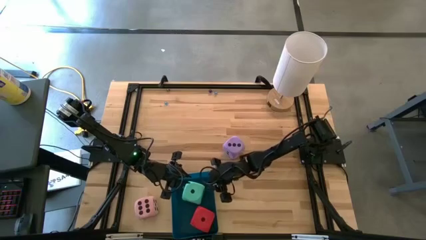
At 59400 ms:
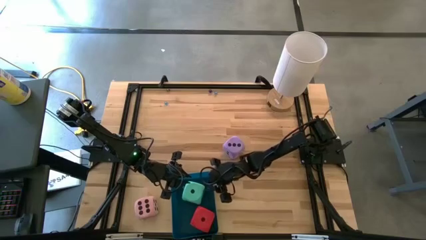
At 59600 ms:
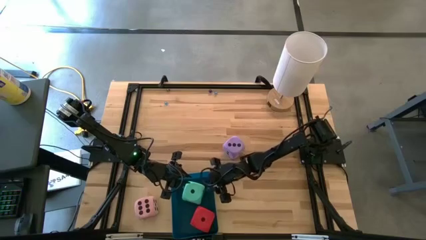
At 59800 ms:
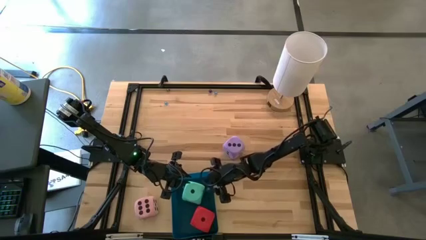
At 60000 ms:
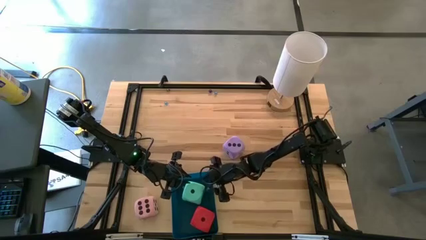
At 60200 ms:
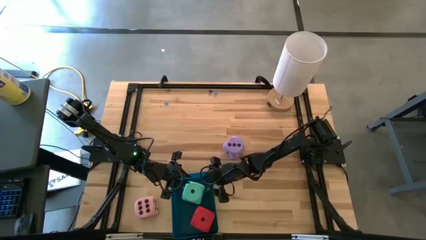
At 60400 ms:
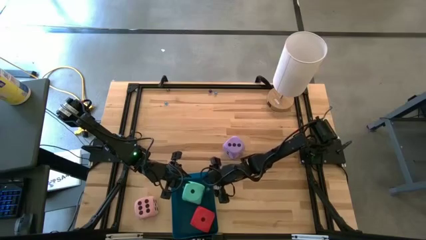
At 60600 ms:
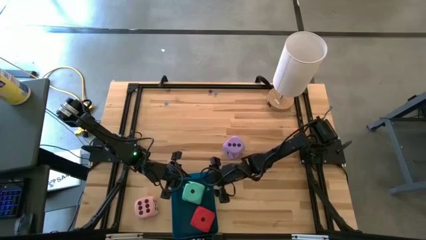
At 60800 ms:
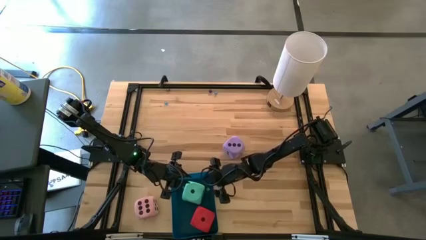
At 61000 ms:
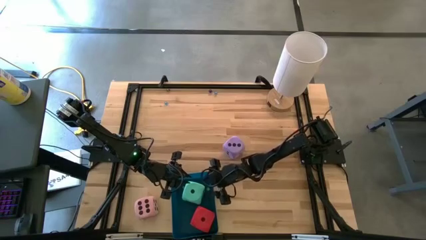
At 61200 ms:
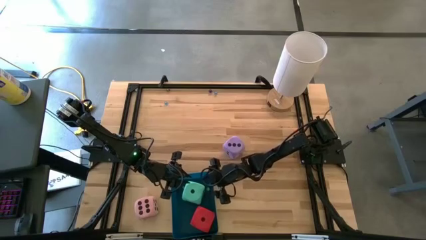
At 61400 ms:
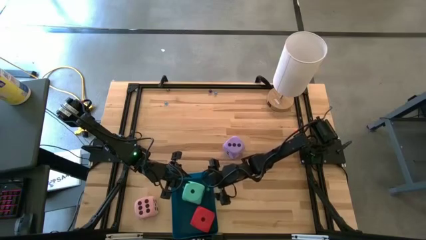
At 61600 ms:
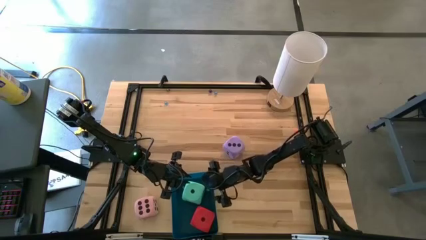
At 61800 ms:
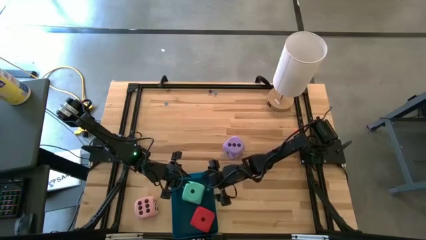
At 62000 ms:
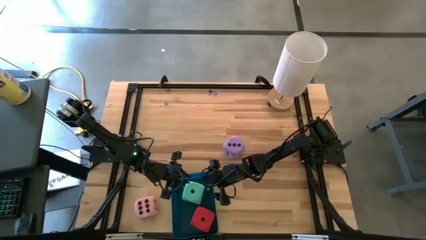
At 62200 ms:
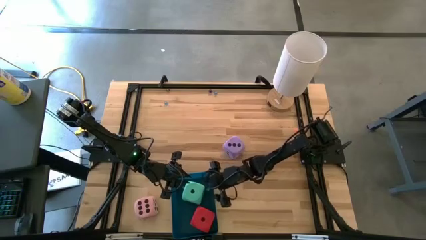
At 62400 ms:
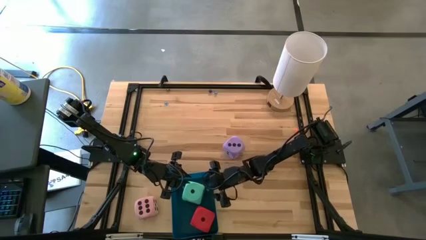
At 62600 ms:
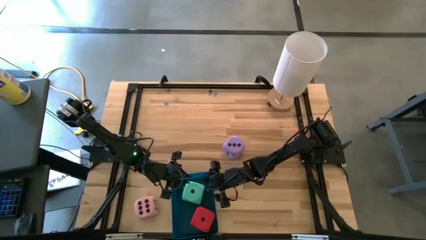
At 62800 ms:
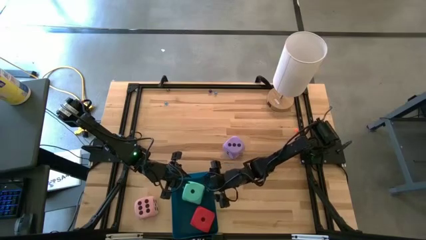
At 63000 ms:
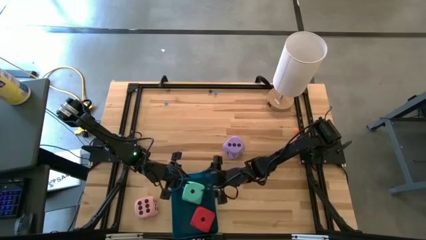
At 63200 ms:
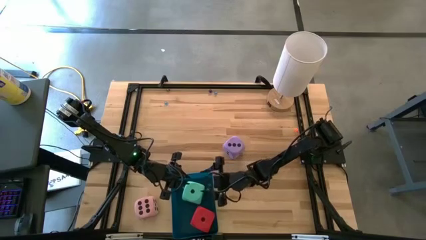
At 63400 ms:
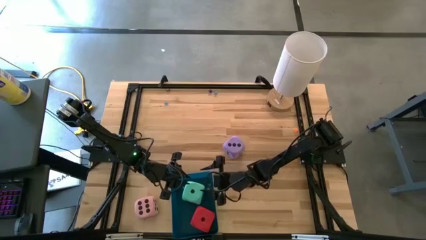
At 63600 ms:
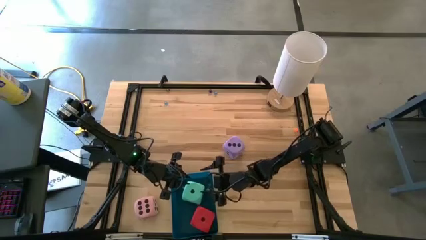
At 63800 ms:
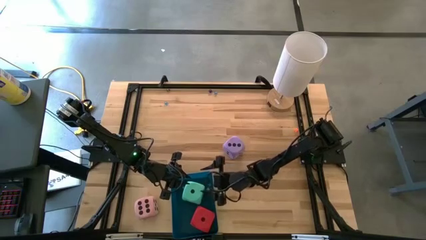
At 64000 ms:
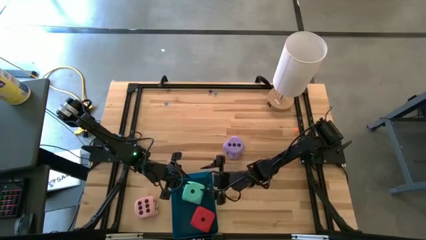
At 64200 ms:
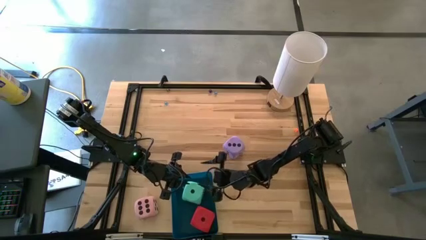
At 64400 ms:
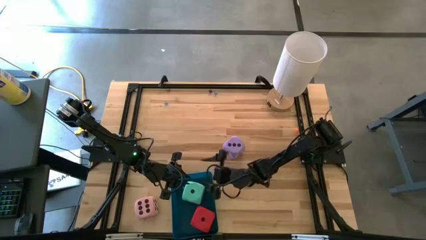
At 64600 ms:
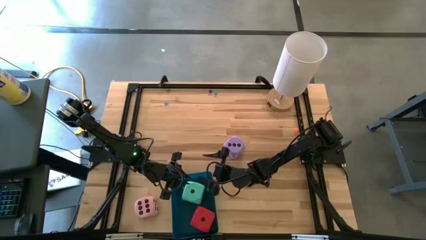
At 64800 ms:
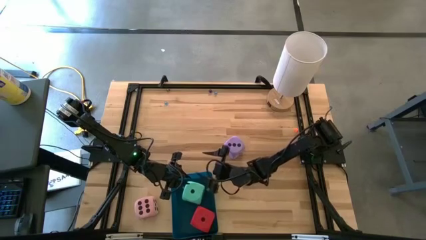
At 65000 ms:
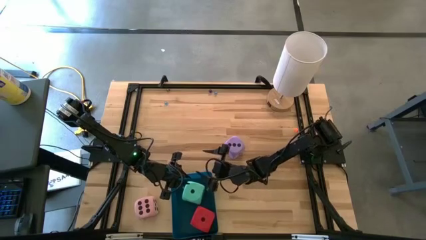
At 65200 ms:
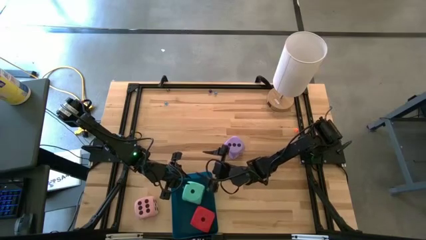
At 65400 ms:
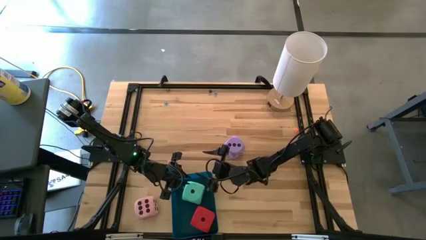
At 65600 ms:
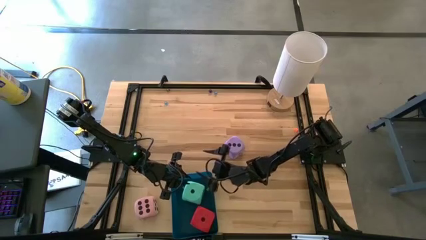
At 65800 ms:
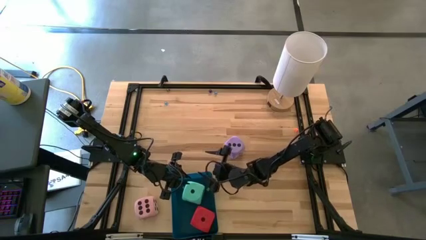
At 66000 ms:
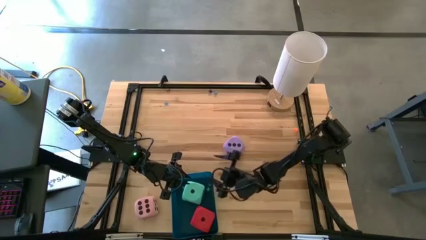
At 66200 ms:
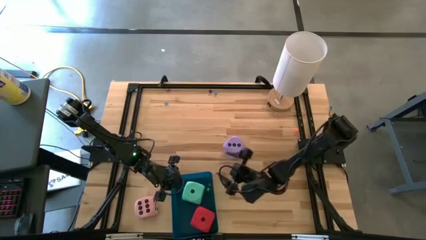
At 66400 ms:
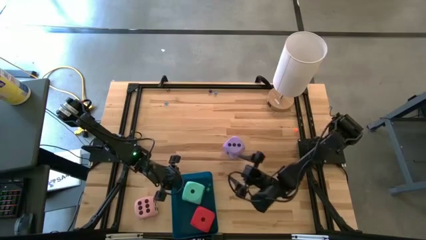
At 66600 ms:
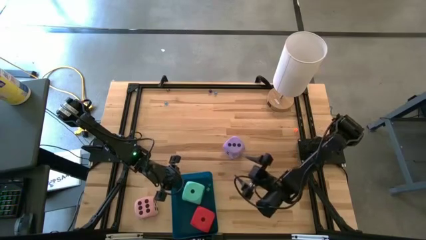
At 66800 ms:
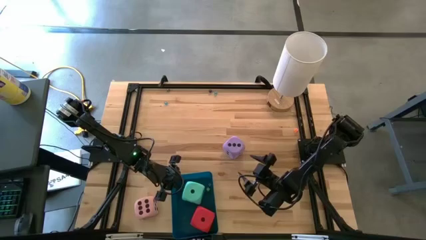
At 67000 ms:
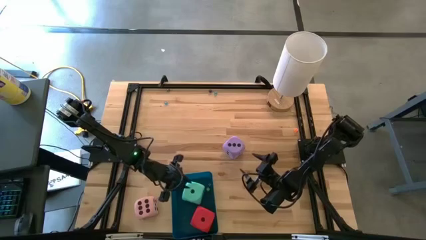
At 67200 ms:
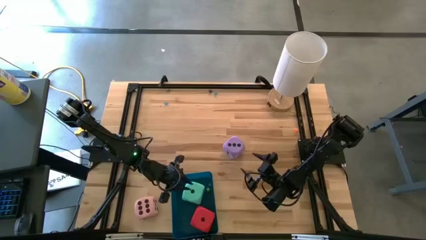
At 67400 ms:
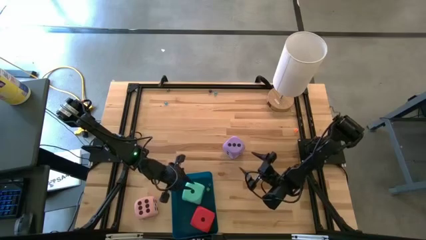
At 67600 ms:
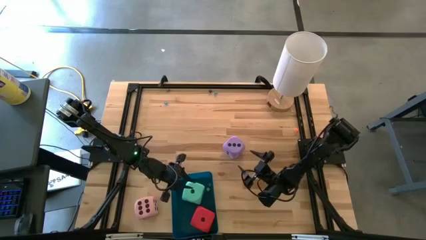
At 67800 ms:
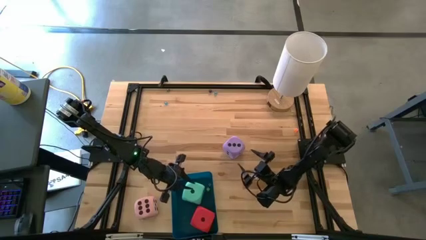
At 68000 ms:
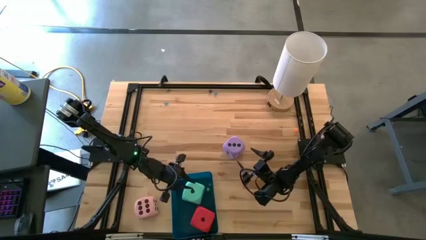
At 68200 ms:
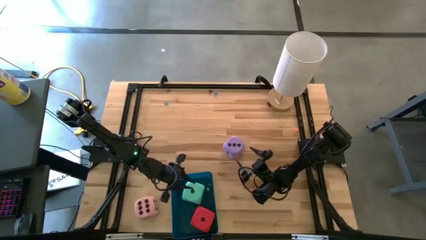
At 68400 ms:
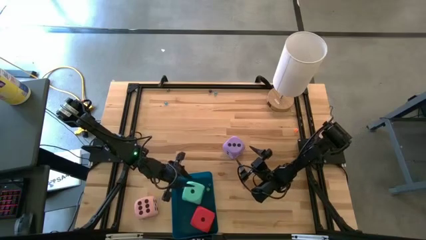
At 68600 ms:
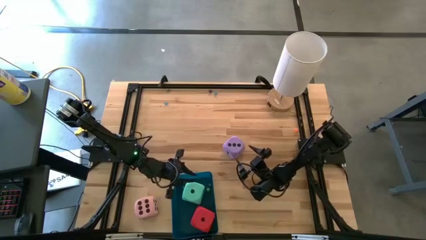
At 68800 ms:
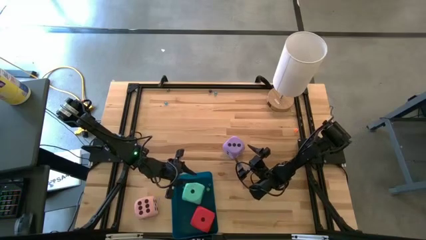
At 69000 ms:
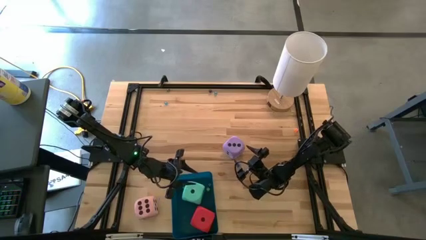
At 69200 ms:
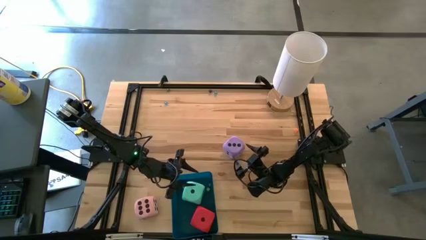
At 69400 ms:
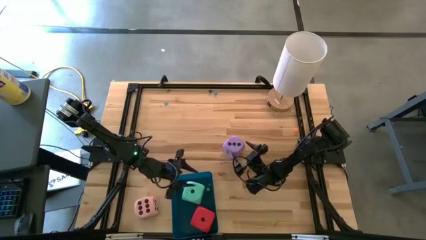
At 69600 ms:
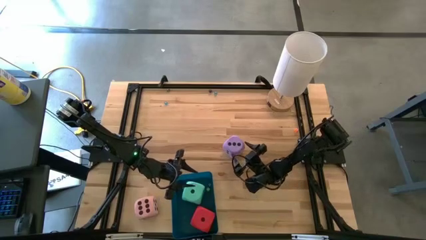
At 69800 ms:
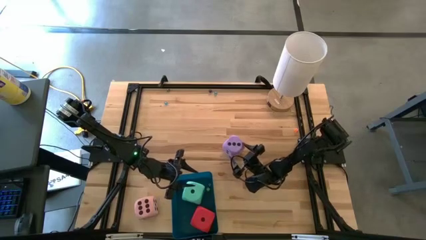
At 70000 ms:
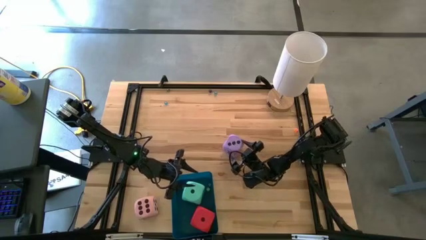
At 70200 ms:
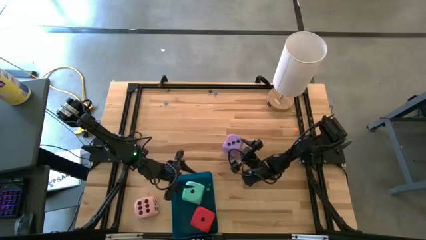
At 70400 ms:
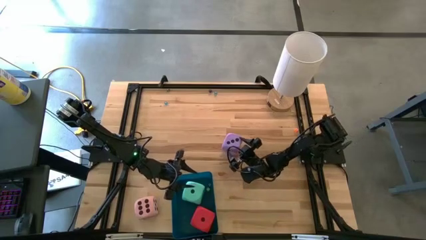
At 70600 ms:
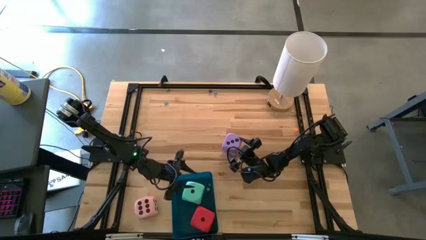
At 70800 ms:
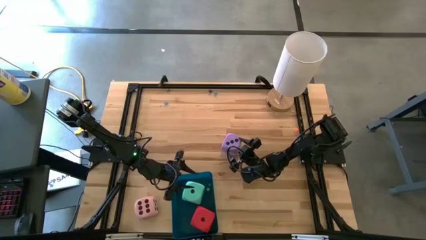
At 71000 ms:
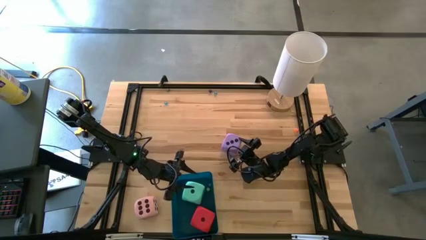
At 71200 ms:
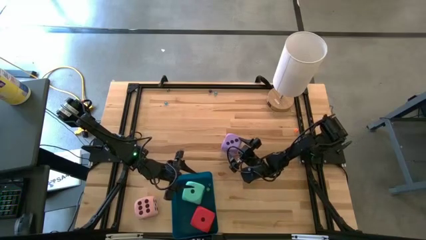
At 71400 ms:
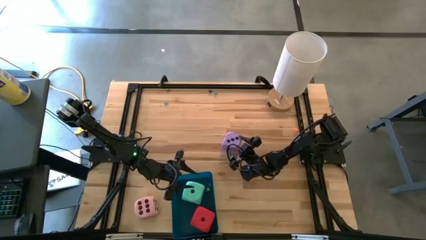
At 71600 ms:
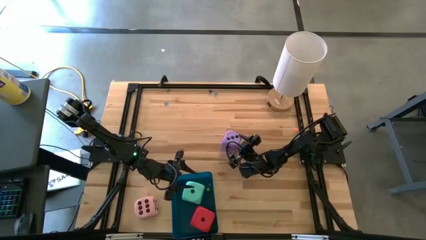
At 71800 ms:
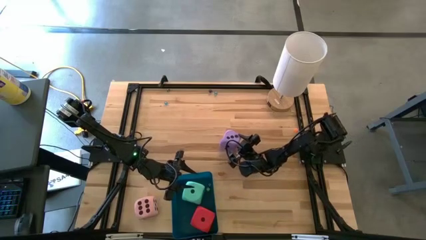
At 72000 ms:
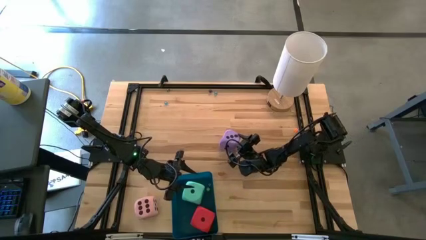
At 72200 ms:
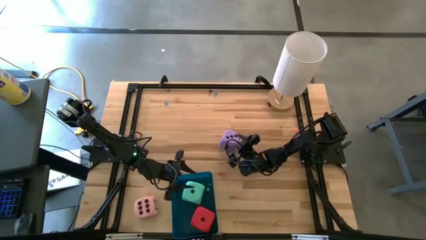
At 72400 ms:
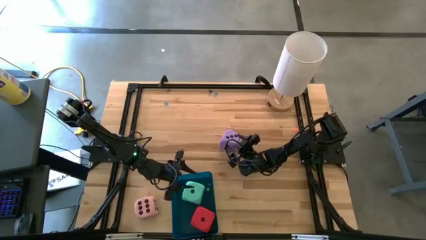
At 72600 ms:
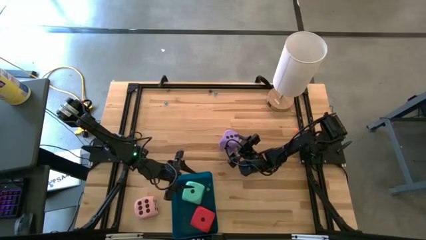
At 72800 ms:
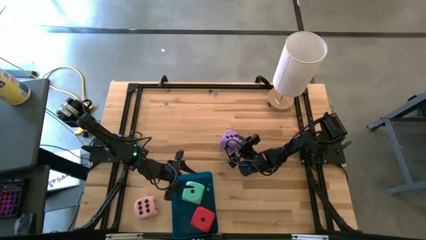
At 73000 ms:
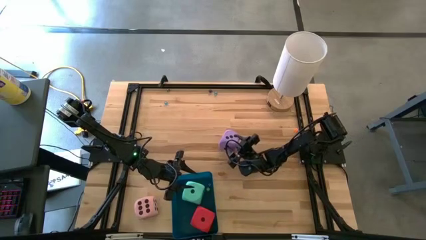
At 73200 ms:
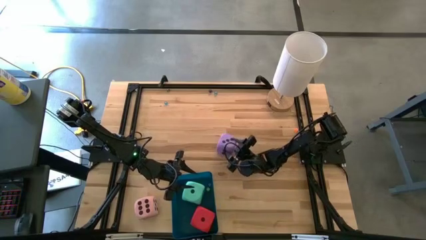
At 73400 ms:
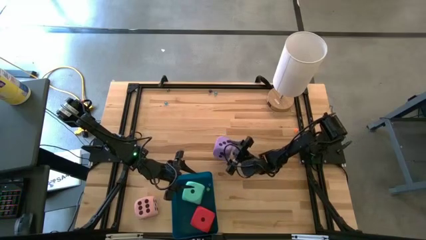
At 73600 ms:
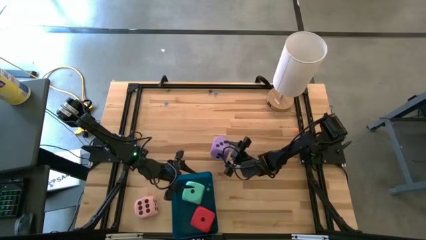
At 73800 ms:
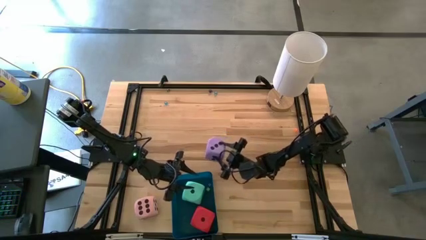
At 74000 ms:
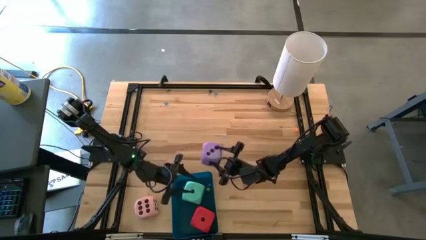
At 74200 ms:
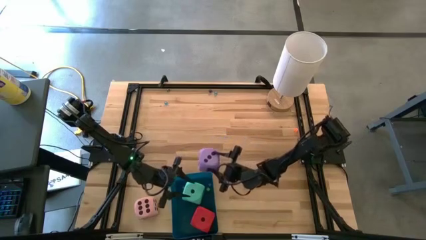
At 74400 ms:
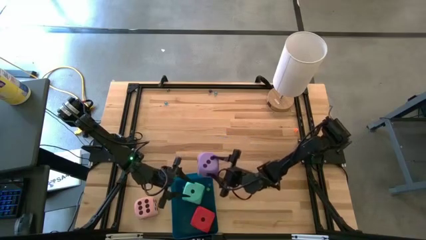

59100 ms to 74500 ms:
Task: Pick & Place Dice
Put the big violet die into the blue bin
